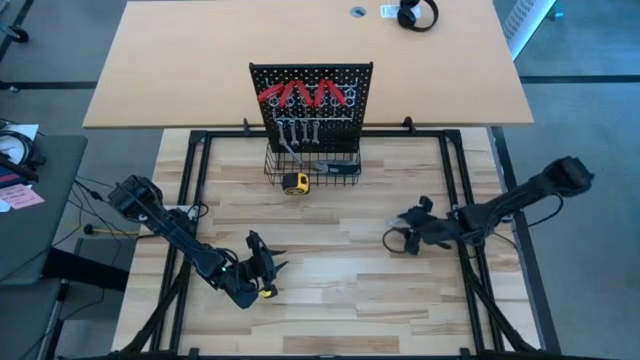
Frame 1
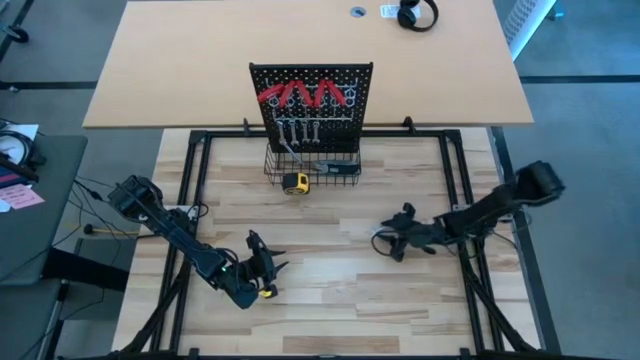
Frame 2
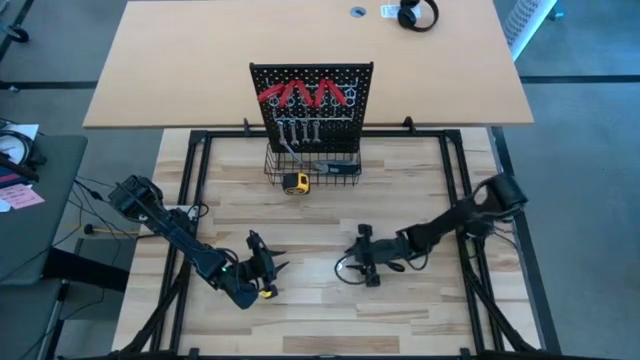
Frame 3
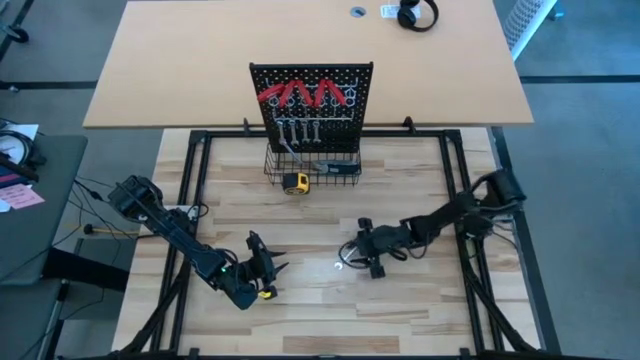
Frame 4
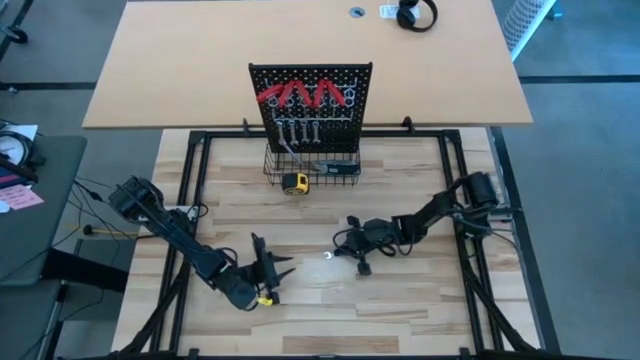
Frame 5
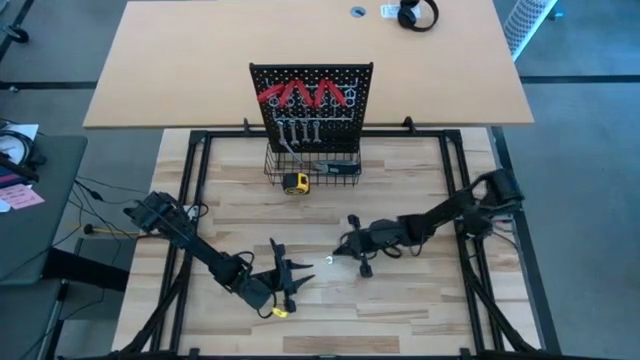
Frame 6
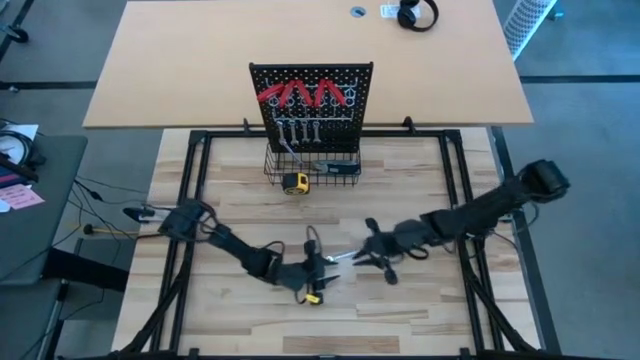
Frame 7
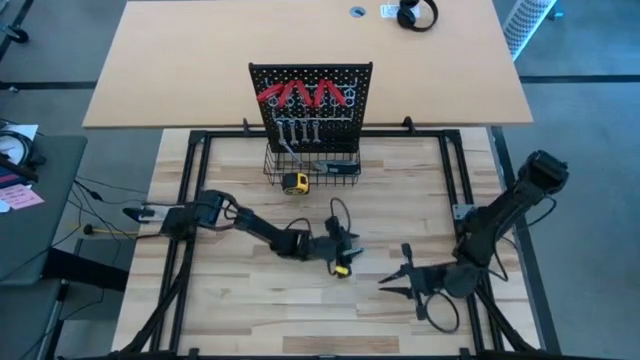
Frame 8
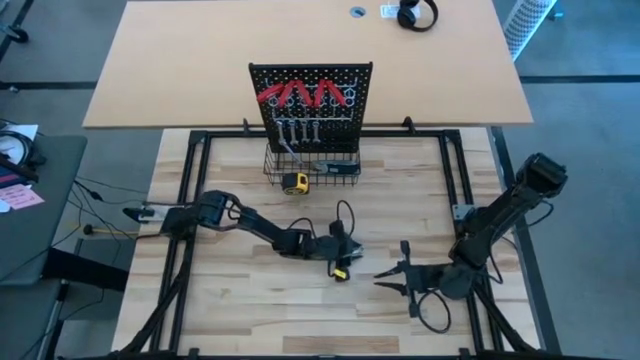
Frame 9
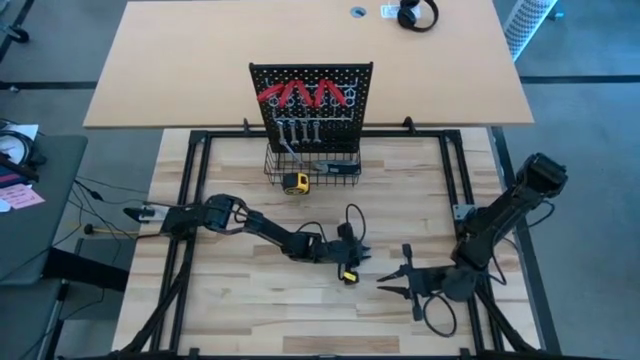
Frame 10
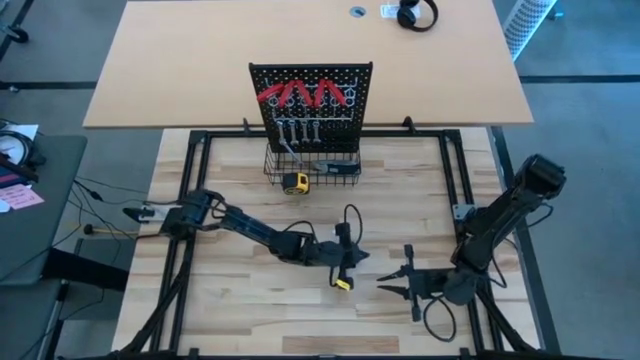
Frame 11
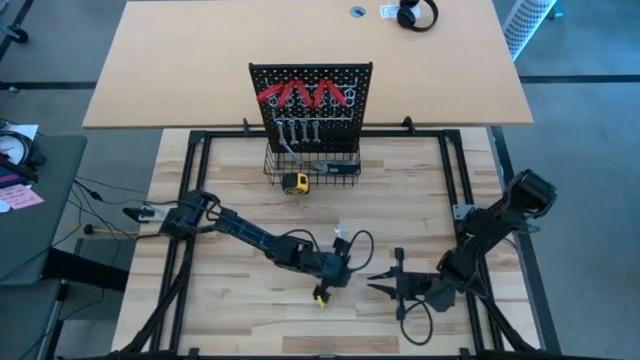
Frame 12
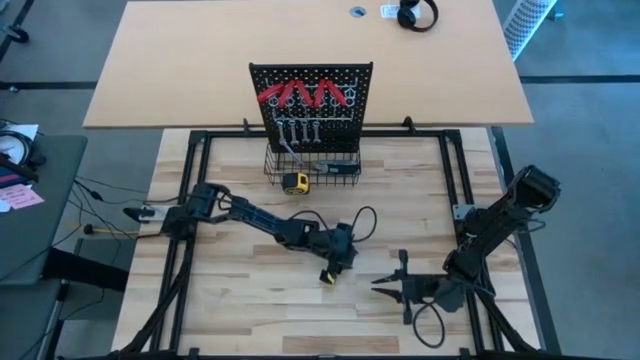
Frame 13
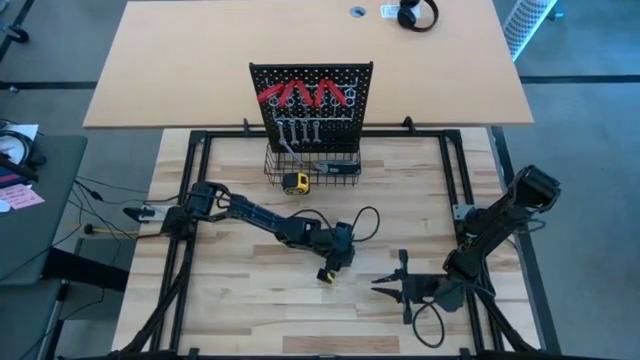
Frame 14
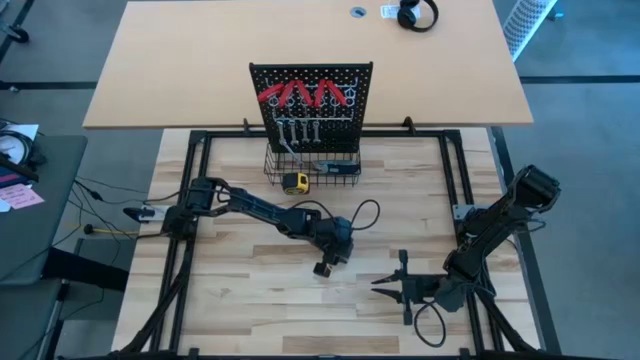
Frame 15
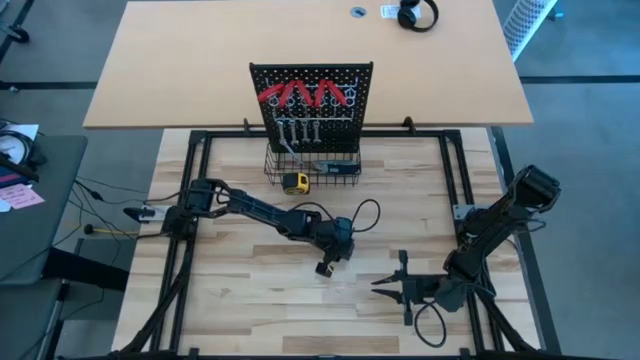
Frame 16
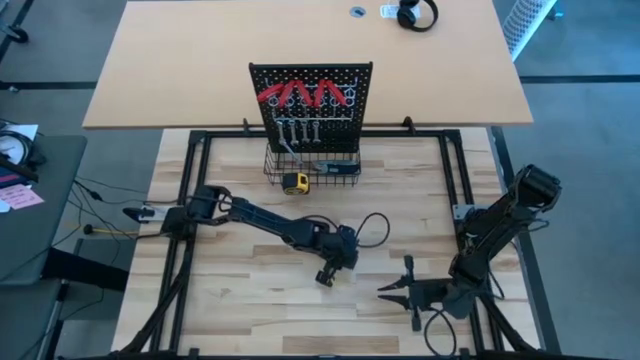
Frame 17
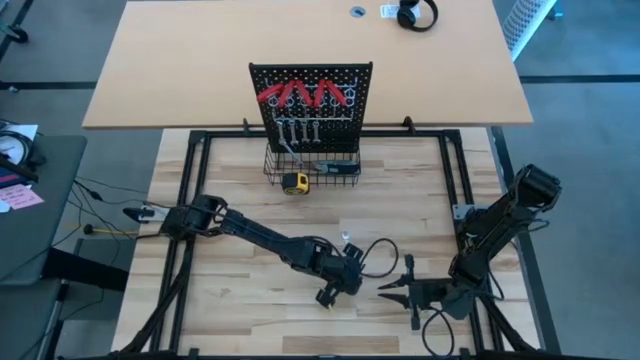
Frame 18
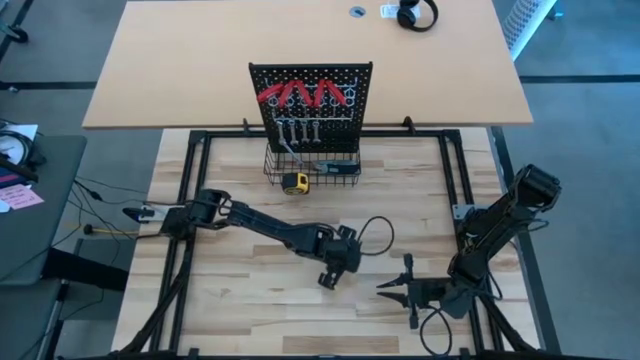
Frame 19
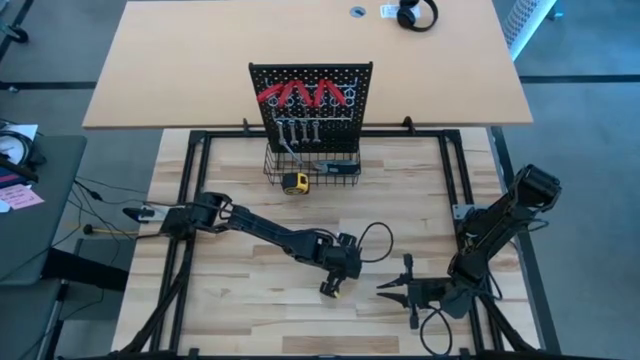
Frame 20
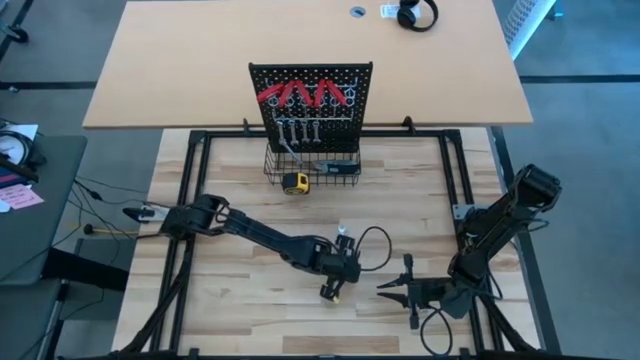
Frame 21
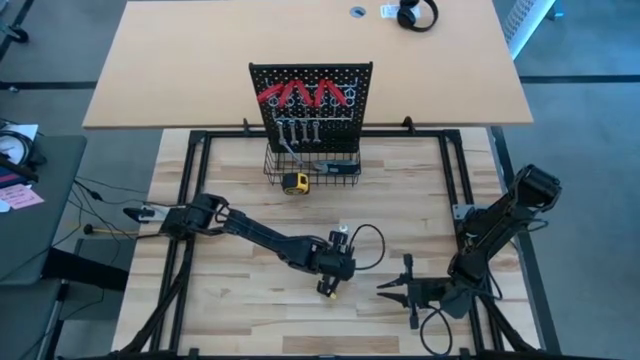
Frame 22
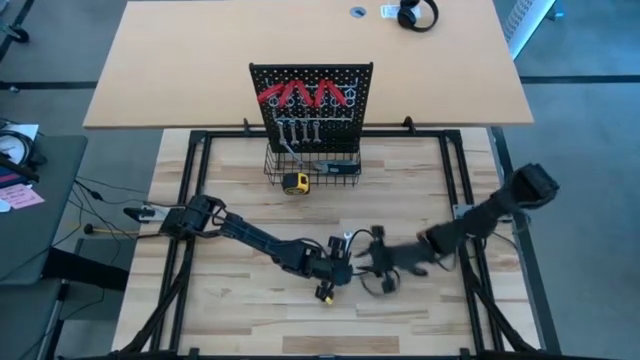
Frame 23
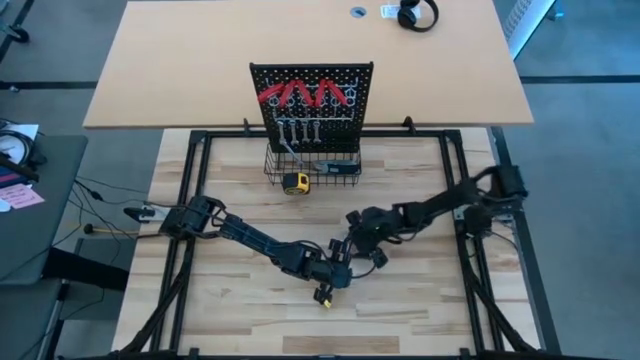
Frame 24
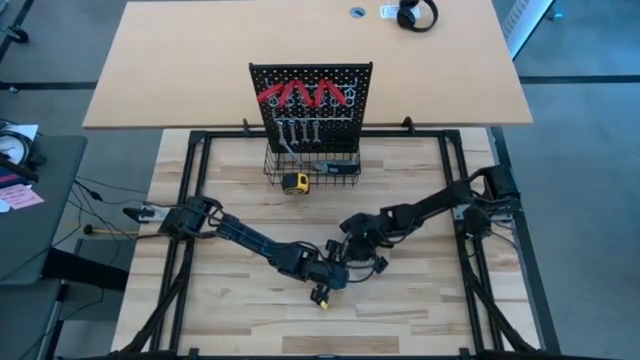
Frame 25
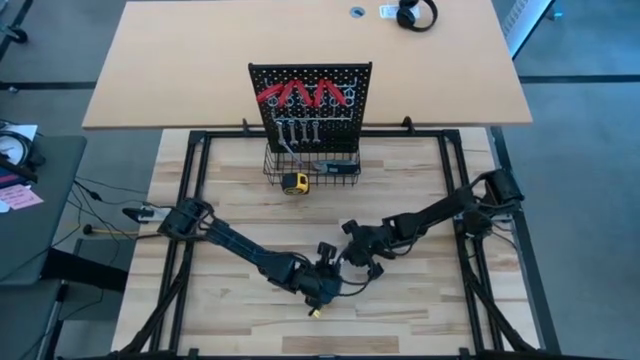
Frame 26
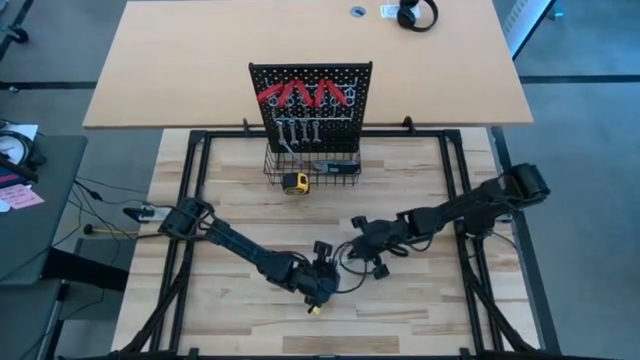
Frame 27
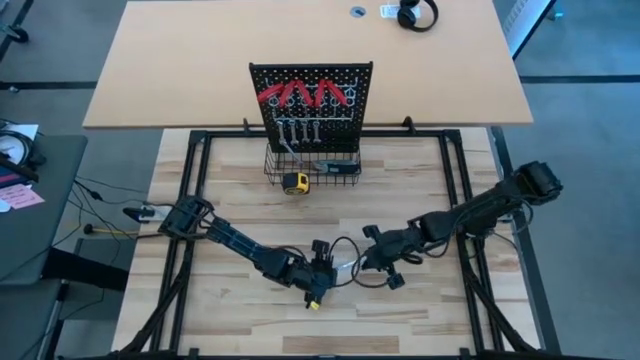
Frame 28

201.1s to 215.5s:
Task: Hang tools onto peg board
Hang the wrench into the pegboard
